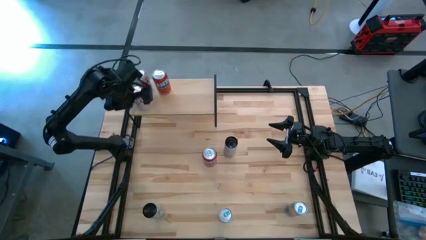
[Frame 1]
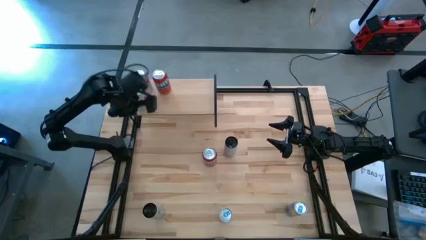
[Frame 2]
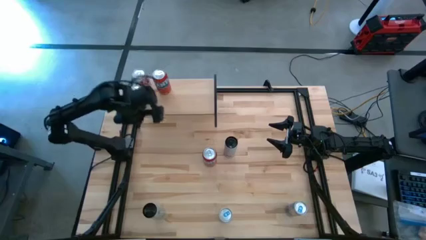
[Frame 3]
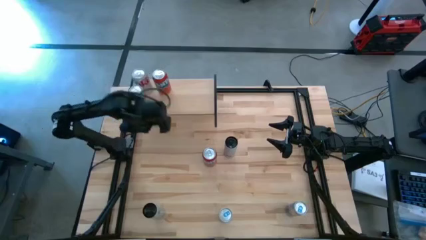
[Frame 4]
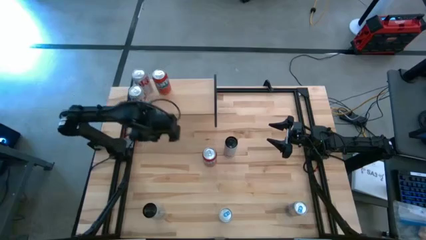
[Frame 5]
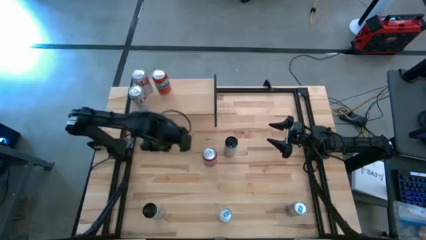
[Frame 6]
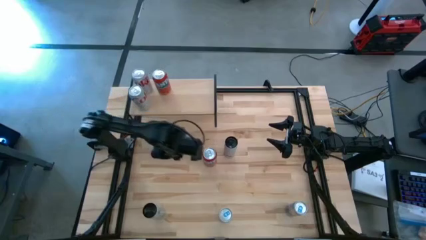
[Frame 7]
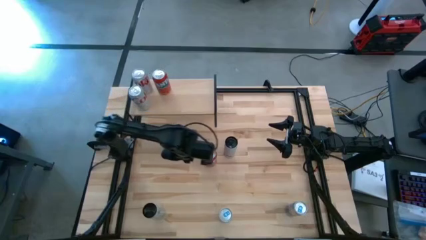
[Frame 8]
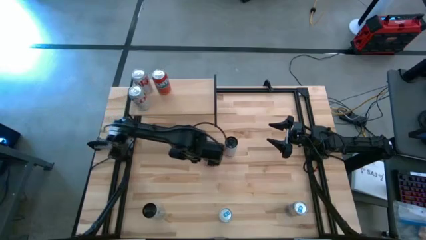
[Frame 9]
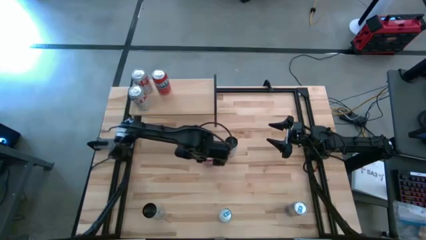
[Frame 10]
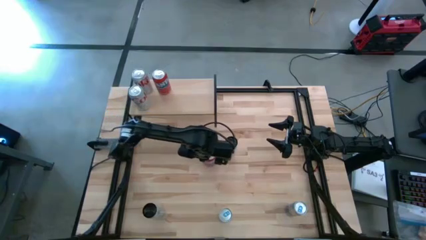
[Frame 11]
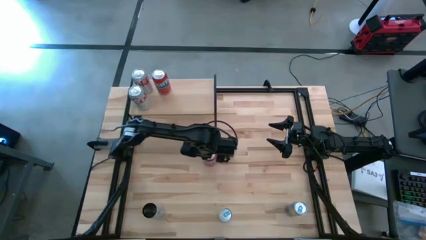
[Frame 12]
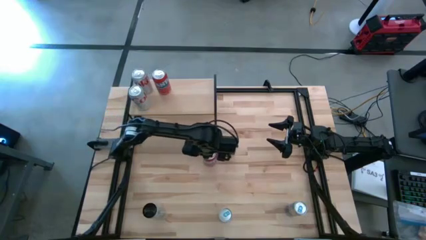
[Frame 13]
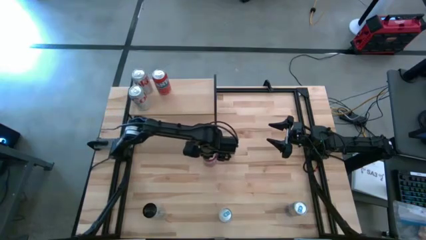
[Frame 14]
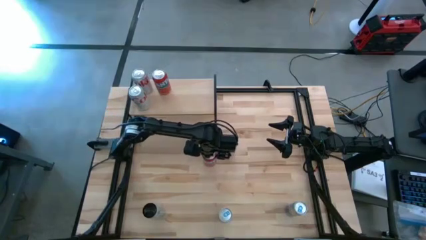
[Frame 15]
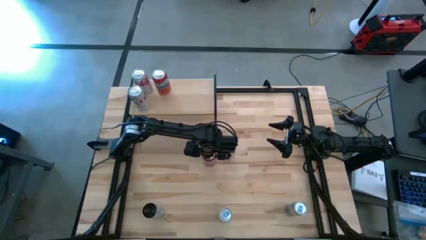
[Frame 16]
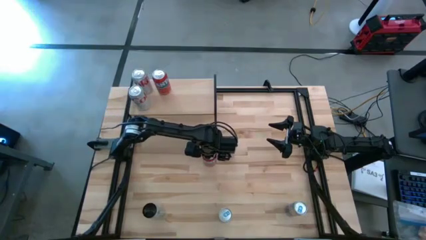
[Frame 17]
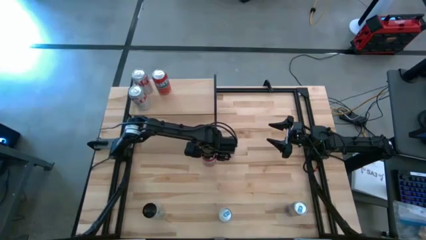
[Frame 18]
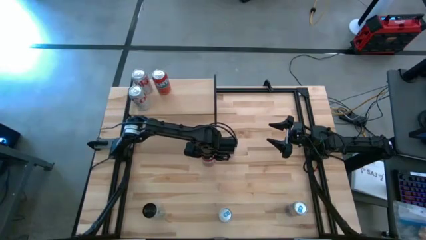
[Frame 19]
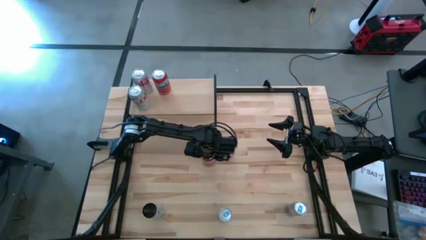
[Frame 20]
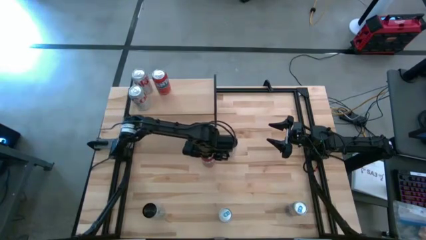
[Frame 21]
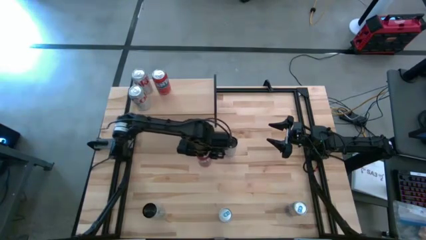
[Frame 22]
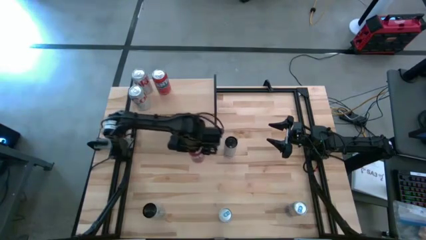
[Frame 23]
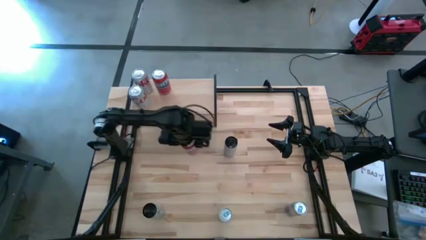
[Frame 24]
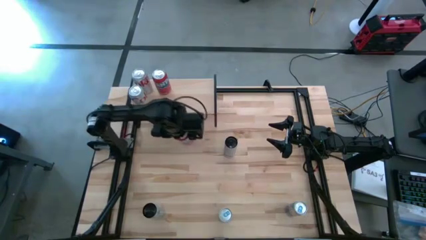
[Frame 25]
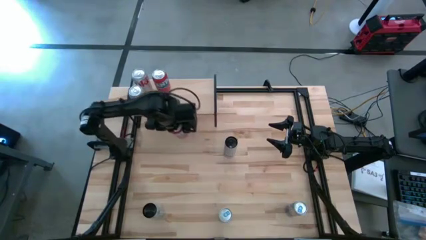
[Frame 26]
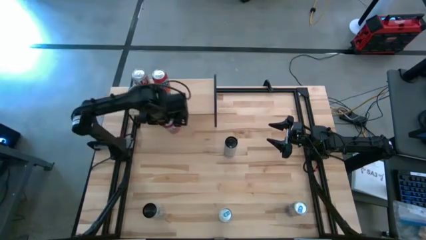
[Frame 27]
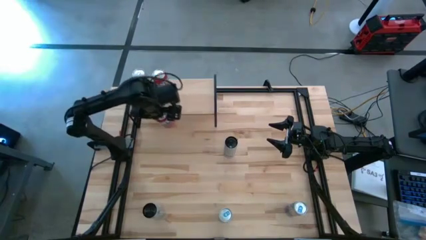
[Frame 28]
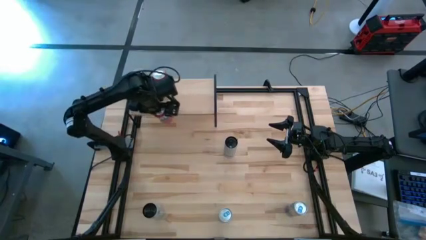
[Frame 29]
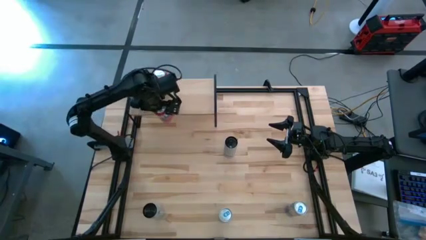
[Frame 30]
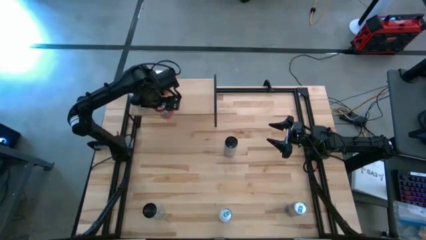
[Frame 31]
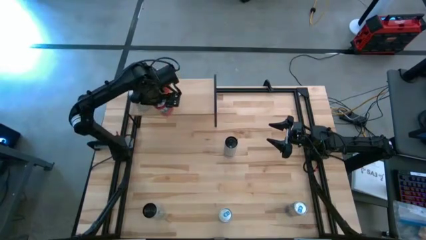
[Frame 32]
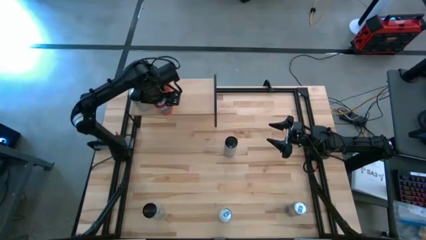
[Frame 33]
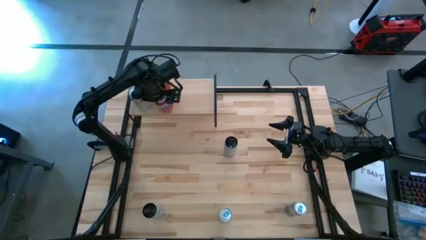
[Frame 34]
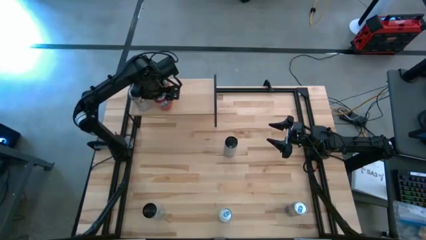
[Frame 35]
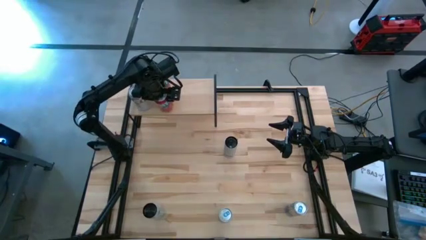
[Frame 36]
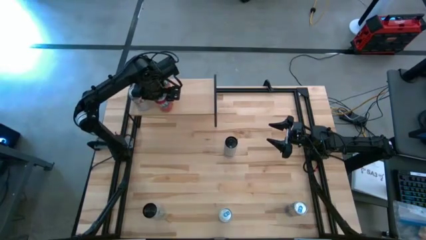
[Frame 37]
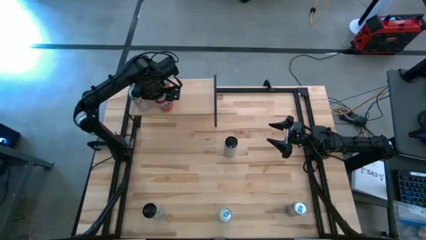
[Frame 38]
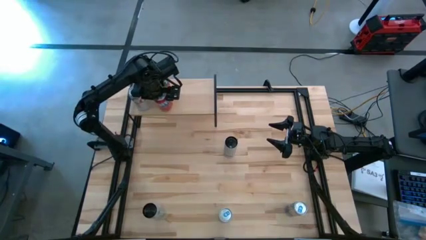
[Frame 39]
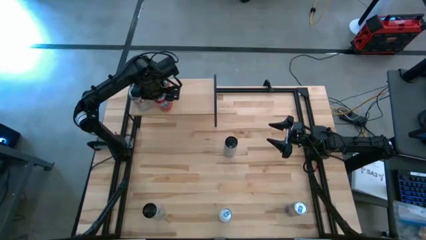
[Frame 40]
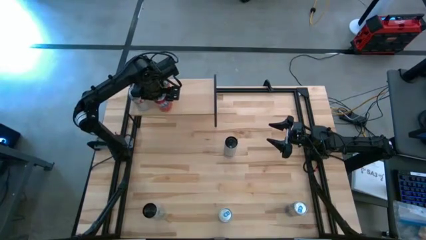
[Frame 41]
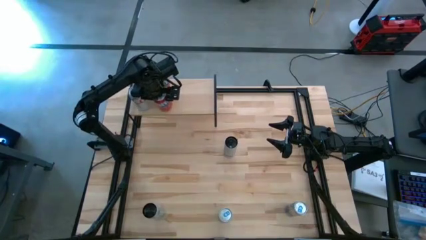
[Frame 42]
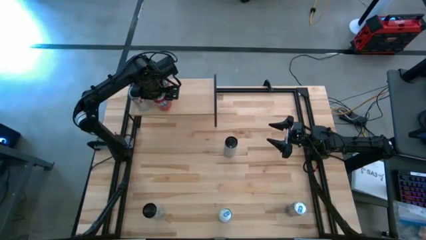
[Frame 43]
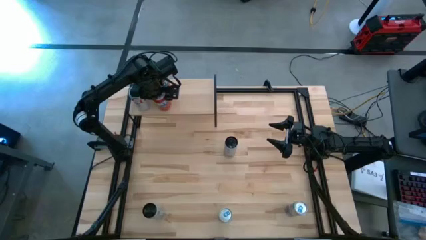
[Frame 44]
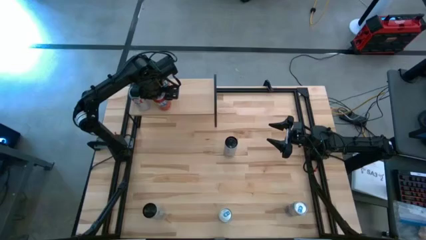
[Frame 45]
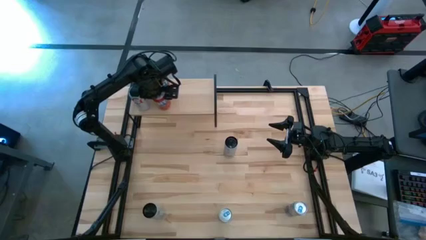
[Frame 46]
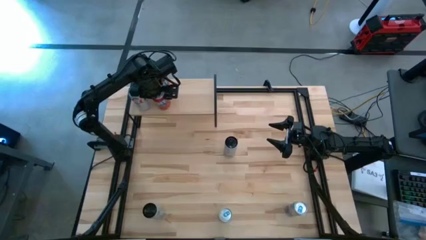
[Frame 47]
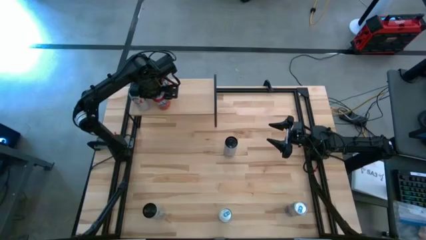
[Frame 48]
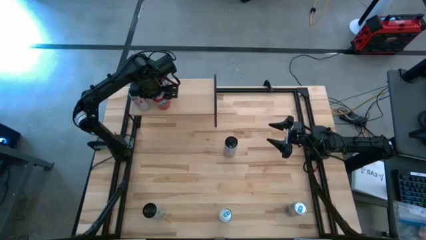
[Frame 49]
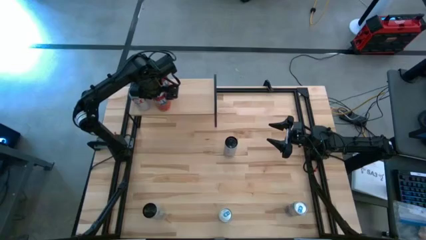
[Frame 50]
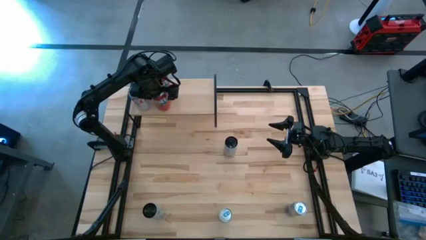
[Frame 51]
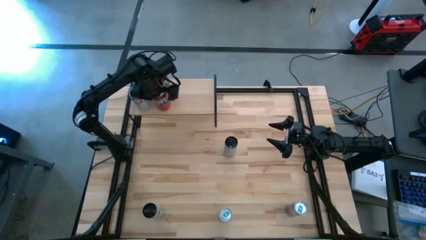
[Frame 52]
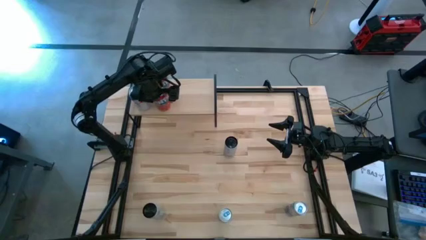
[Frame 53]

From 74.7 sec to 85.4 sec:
Task: Place canned beverage on shelf
Put the orange soda can and align the with the other orange soda can on the shelf

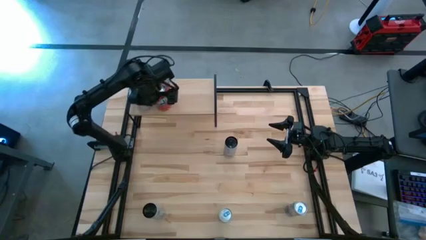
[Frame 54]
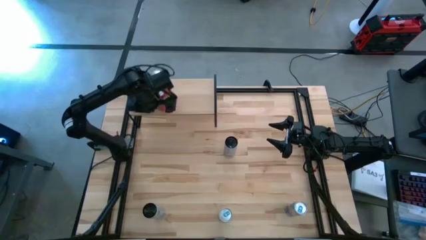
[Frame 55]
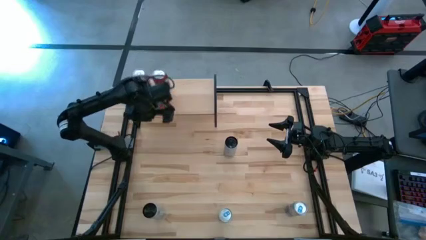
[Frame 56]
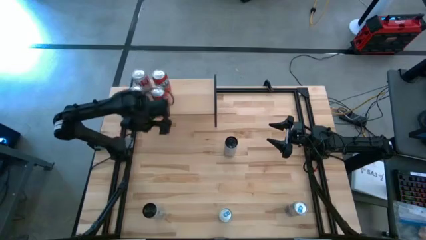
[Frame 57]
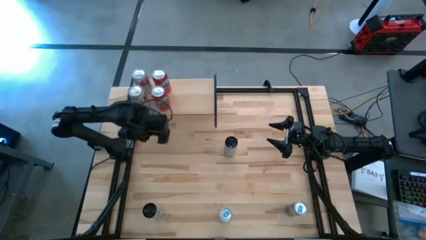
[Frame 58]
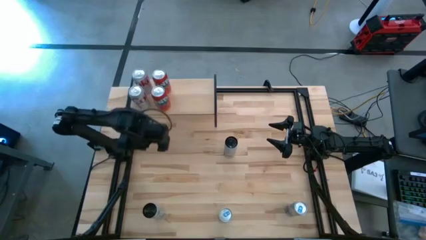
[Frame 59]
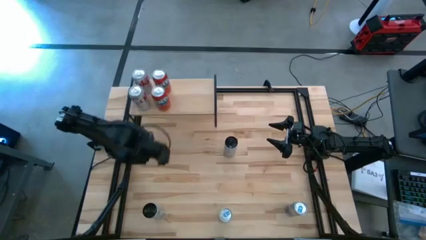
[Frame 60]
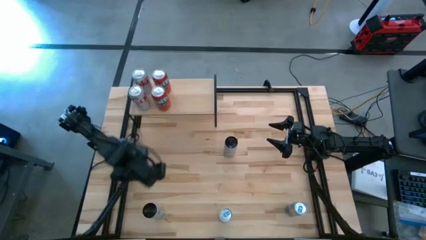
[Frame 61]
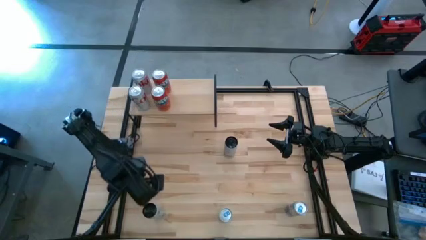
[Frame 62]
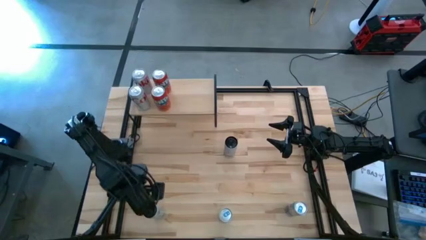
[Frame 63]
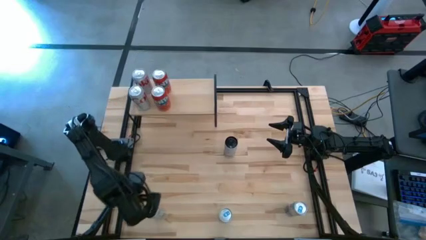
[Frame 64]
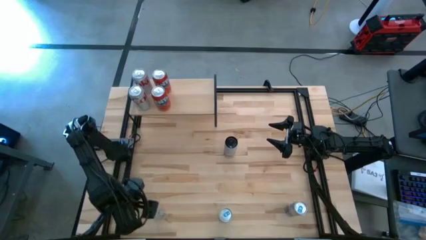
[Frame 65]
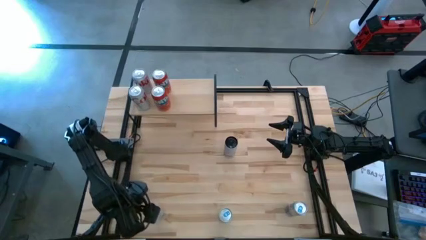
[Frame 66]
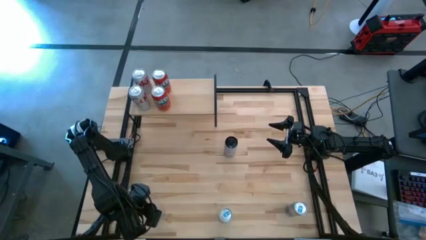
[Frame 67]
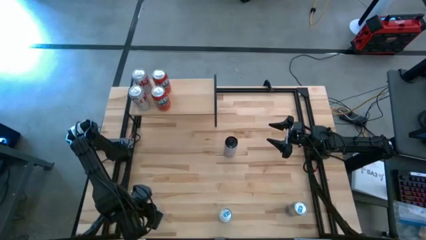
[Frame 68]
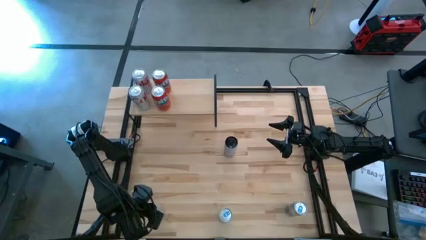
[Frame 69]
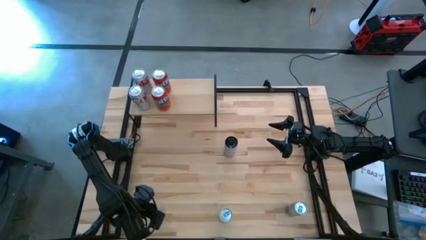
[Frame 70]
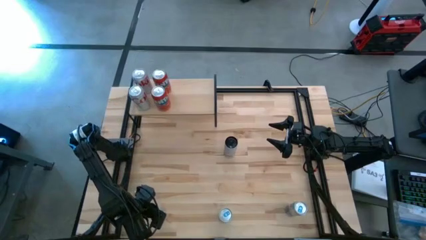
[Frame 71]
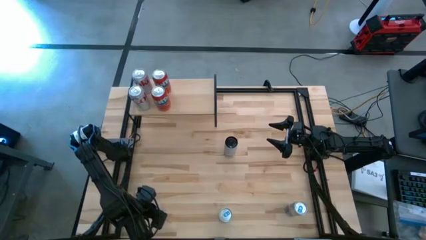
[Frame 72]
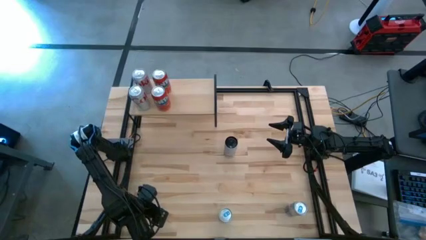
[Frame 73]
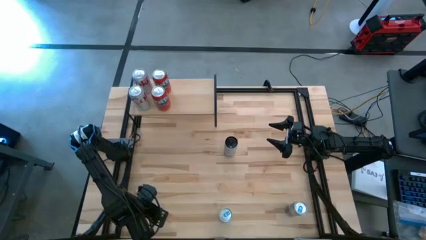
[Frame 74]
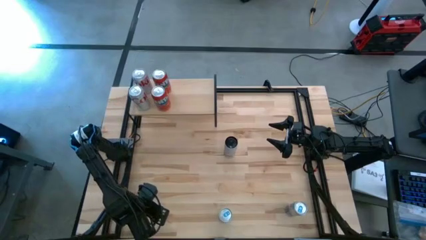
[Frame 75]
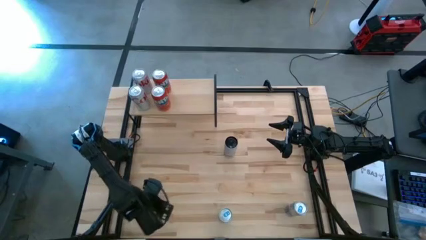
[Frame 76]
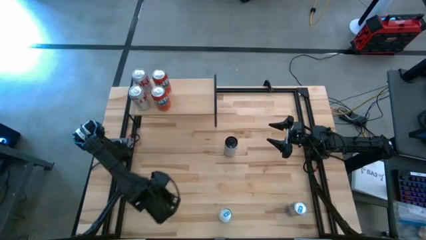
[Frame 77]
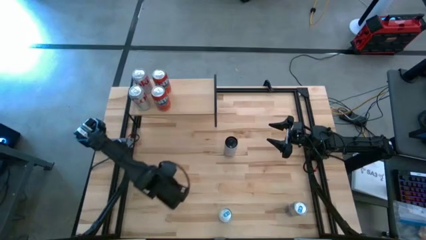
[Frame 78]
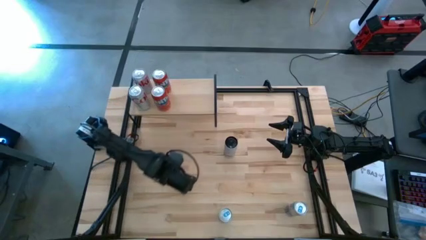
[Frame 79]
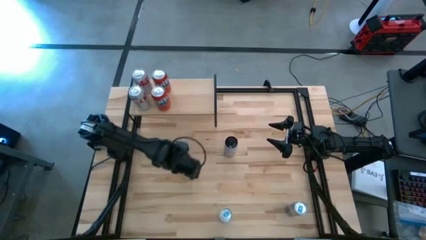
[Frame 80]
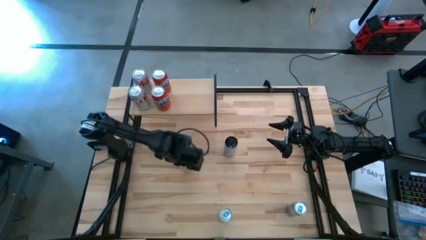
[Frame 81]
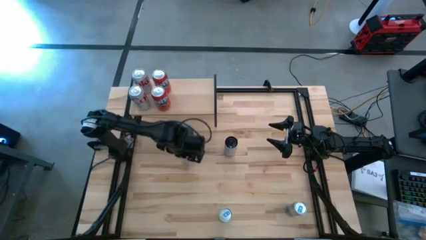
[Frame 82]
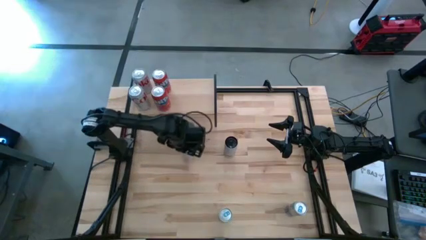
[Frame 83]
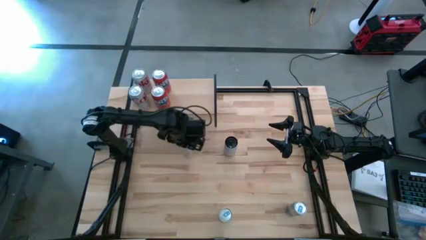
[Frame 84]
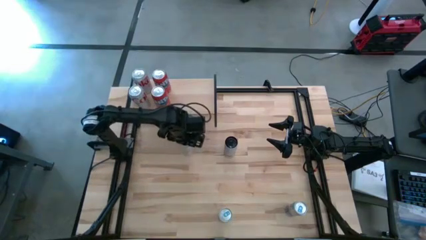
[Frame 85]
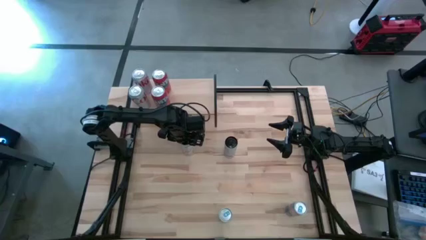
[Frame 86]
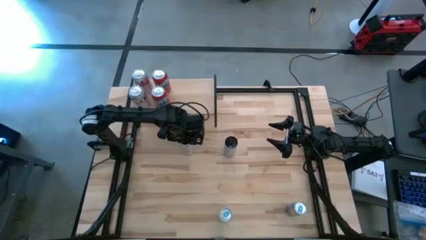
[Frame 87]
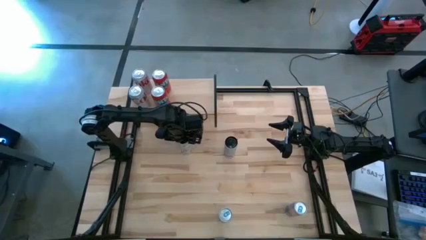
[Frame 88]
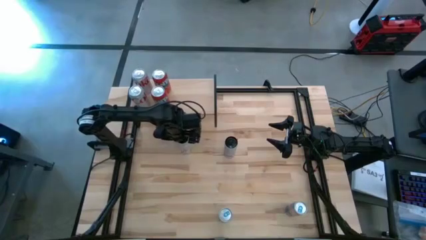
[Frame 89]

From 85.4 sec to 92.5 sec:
Move the bottom white pink soda can to the left middle on the table
